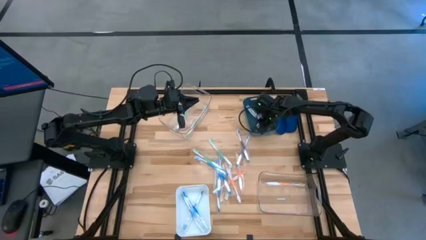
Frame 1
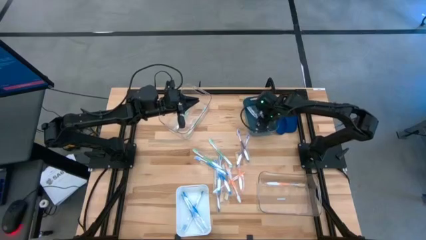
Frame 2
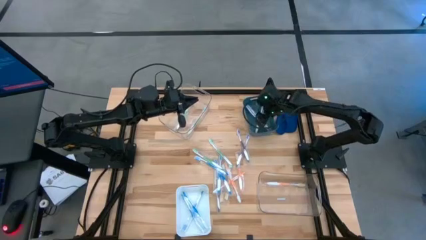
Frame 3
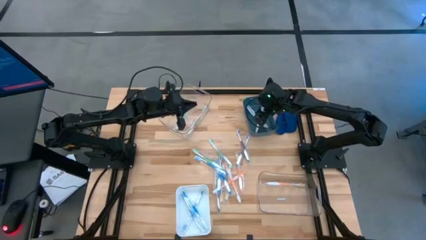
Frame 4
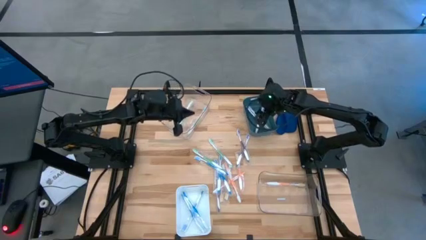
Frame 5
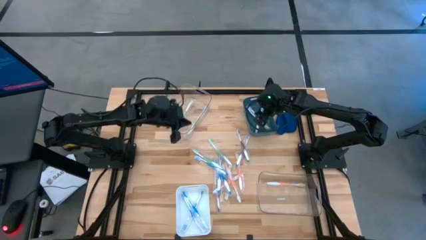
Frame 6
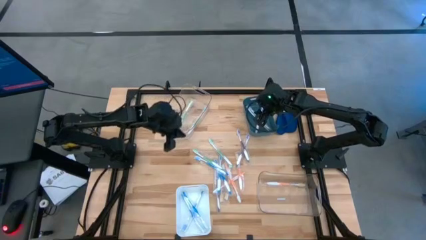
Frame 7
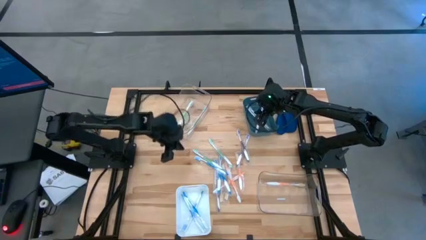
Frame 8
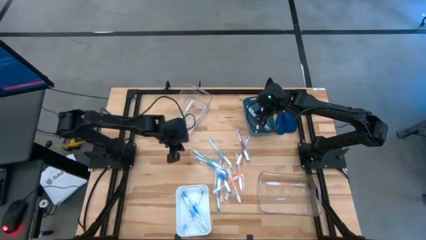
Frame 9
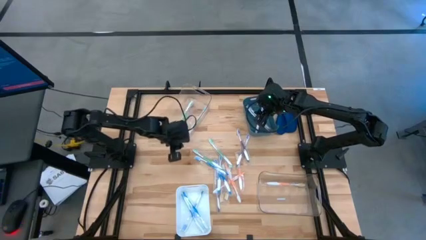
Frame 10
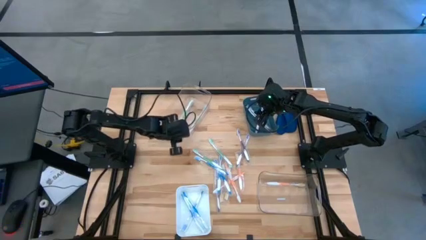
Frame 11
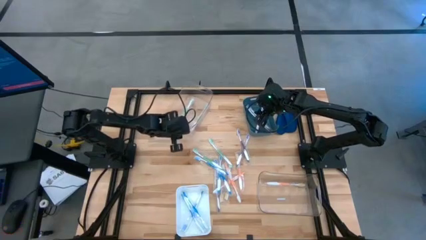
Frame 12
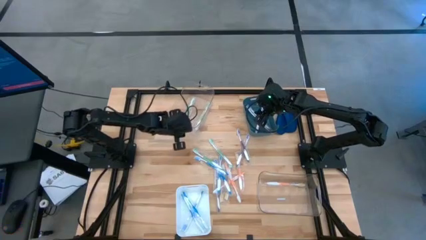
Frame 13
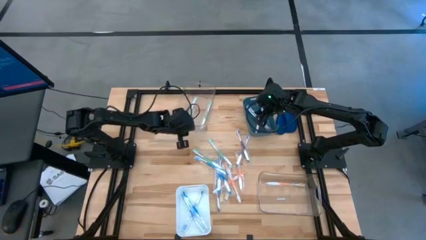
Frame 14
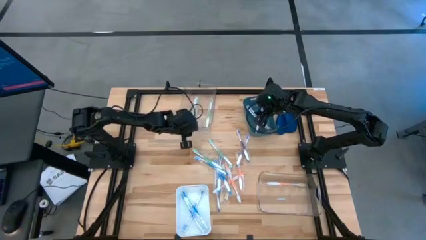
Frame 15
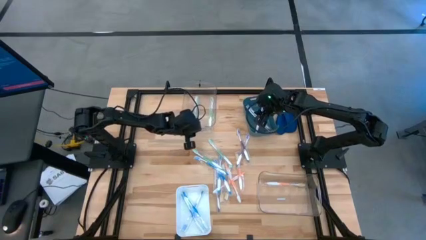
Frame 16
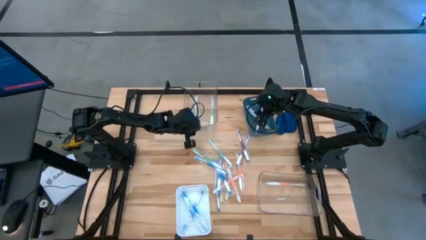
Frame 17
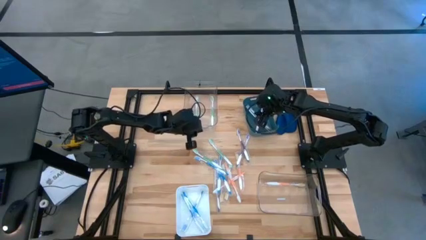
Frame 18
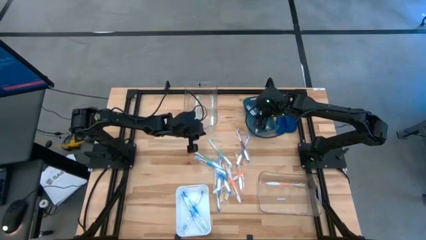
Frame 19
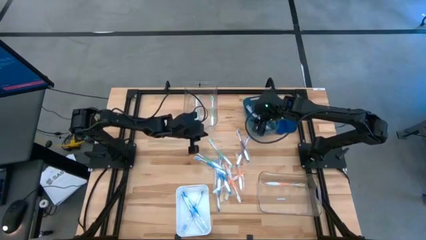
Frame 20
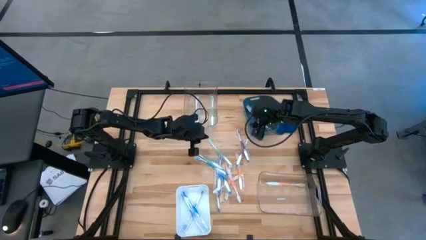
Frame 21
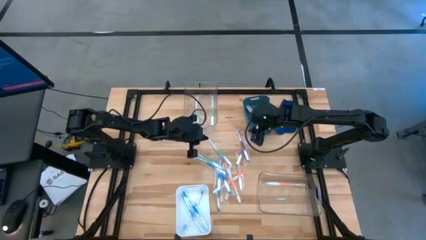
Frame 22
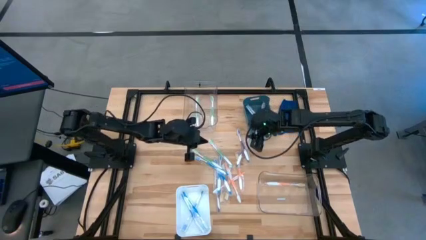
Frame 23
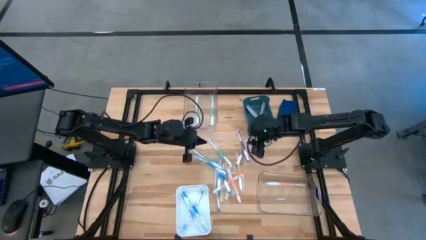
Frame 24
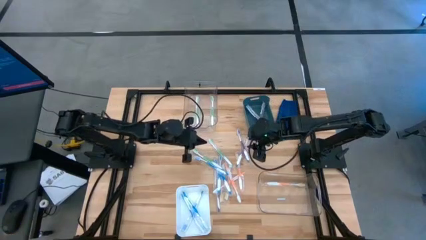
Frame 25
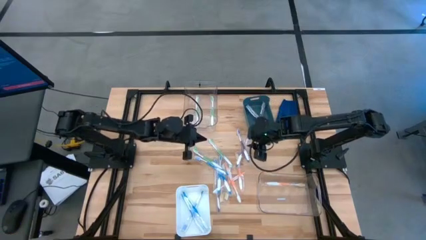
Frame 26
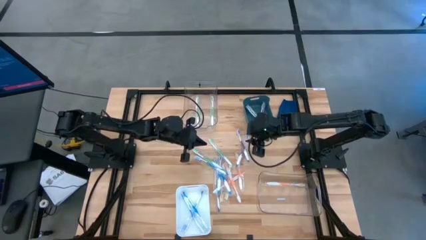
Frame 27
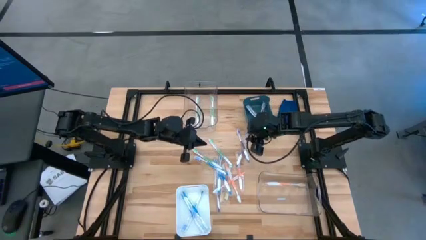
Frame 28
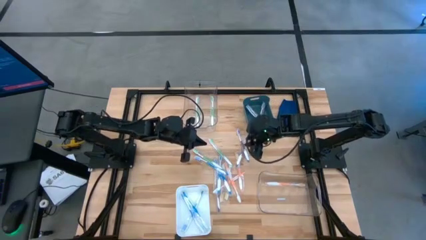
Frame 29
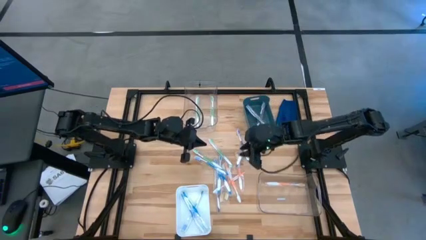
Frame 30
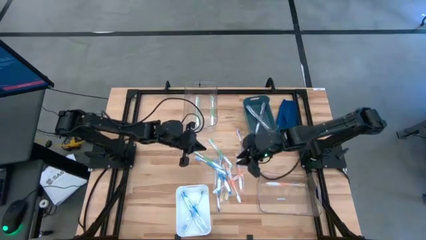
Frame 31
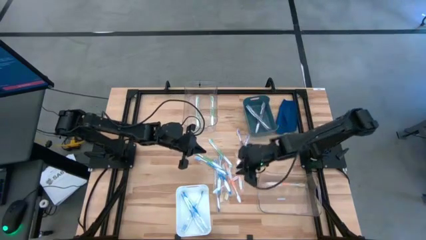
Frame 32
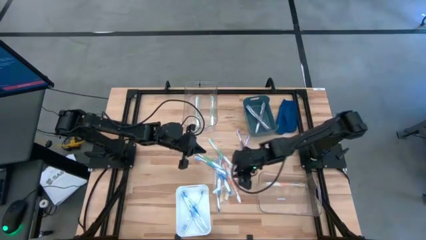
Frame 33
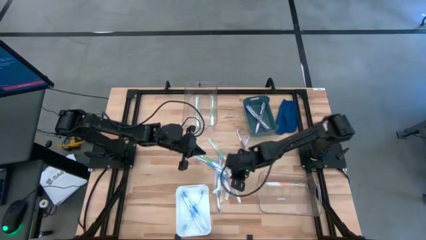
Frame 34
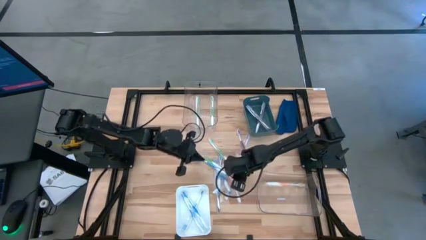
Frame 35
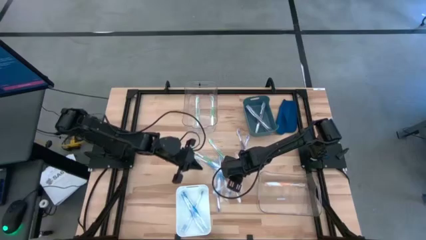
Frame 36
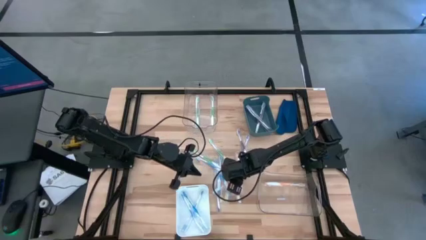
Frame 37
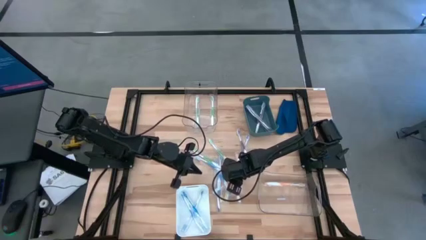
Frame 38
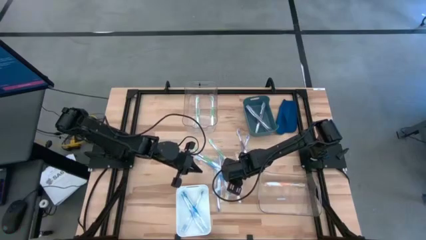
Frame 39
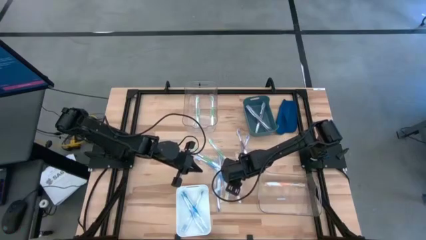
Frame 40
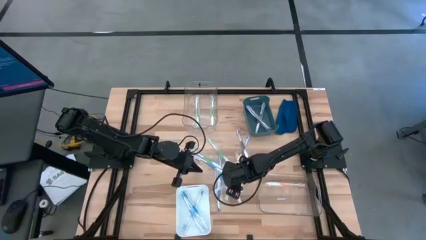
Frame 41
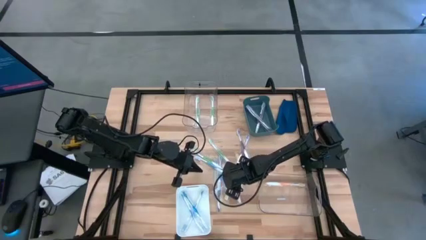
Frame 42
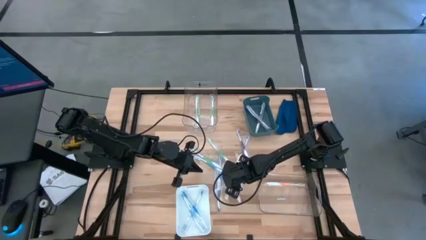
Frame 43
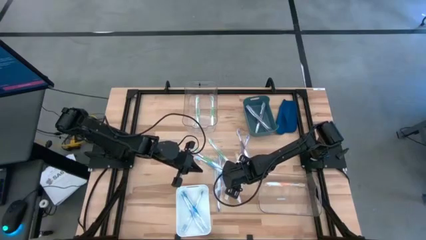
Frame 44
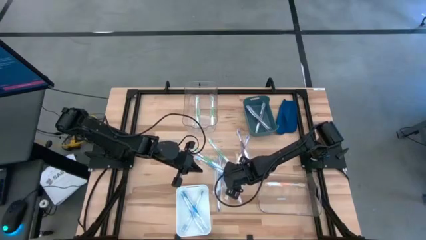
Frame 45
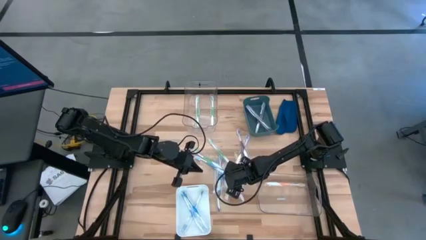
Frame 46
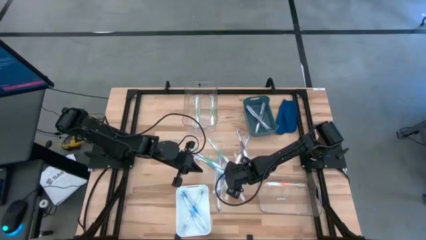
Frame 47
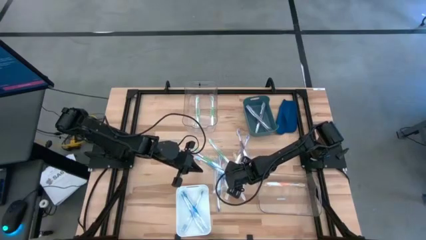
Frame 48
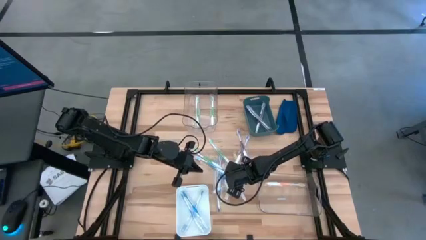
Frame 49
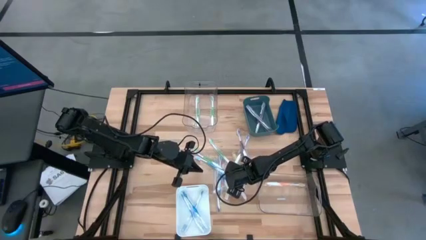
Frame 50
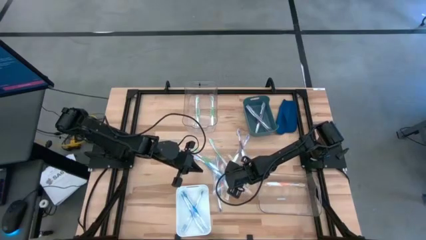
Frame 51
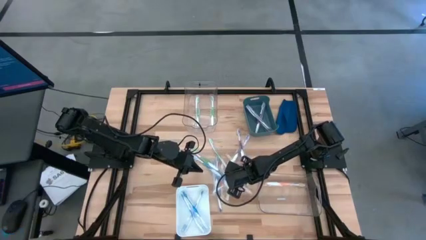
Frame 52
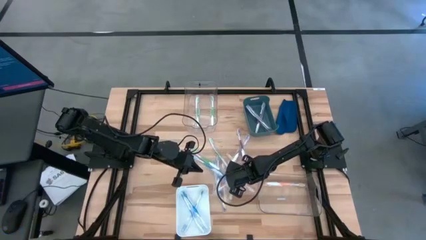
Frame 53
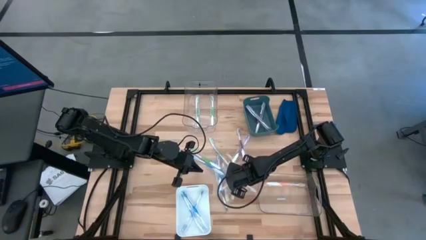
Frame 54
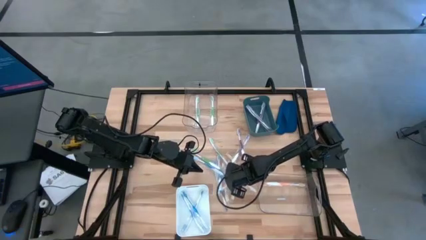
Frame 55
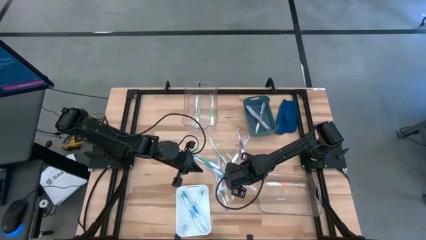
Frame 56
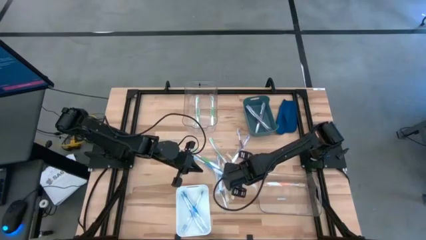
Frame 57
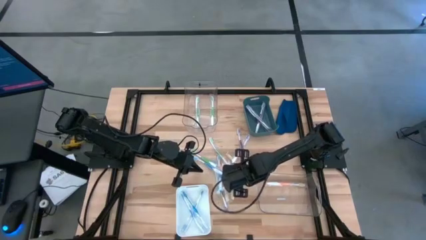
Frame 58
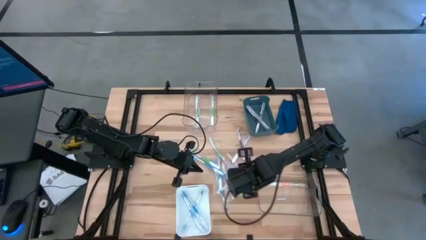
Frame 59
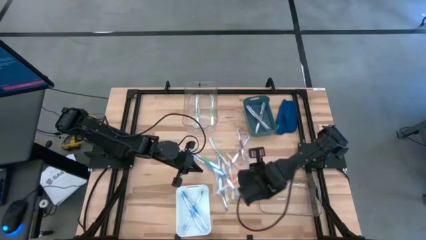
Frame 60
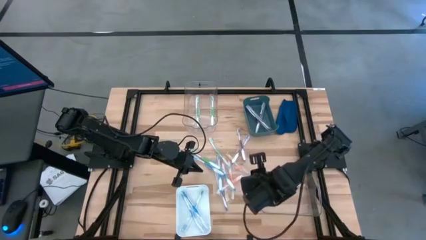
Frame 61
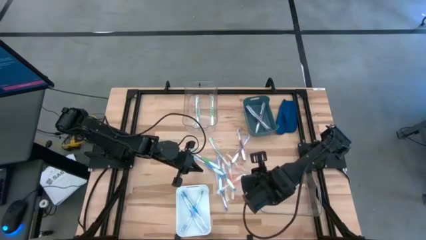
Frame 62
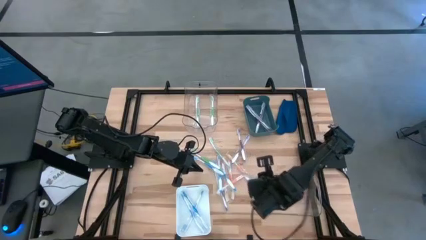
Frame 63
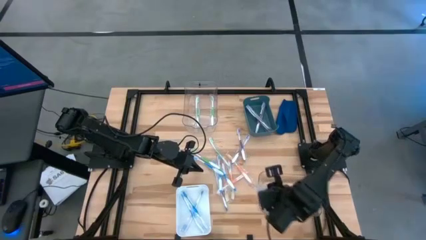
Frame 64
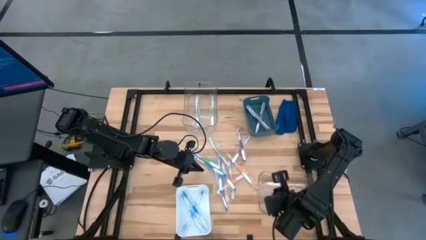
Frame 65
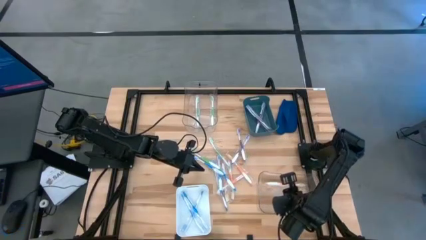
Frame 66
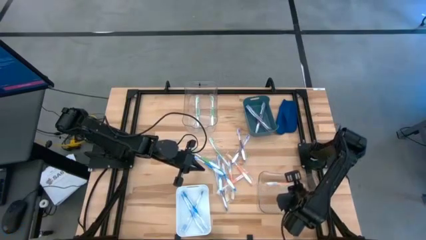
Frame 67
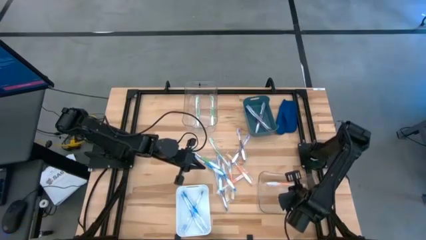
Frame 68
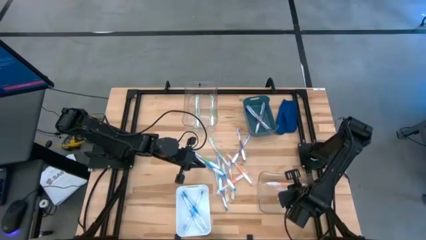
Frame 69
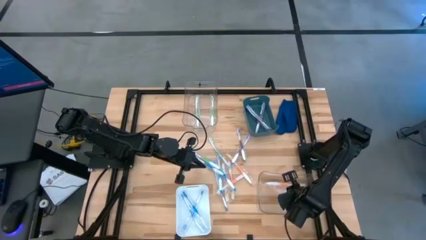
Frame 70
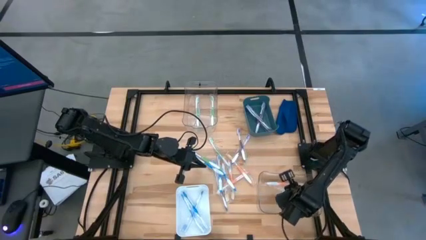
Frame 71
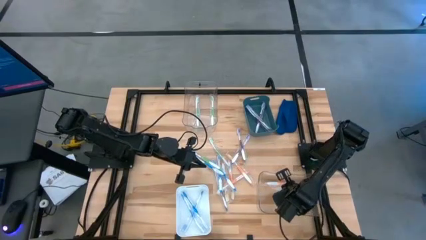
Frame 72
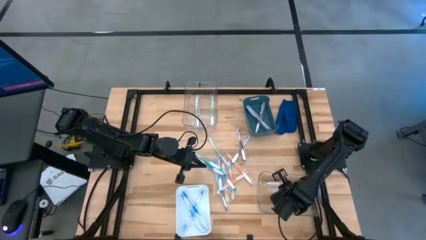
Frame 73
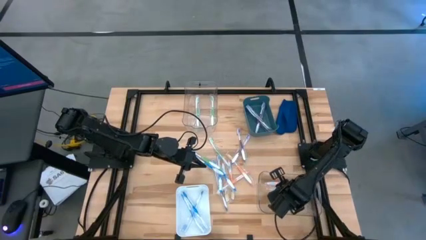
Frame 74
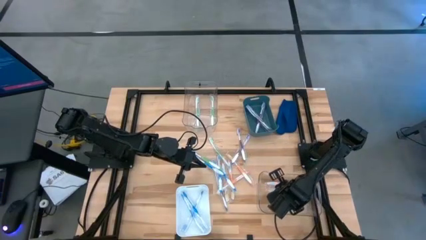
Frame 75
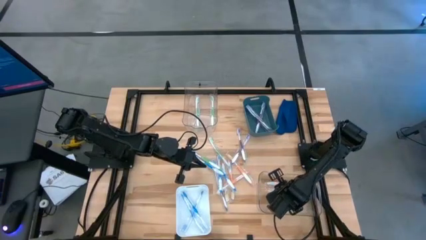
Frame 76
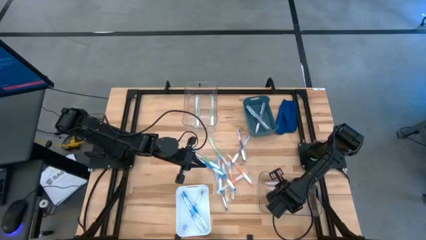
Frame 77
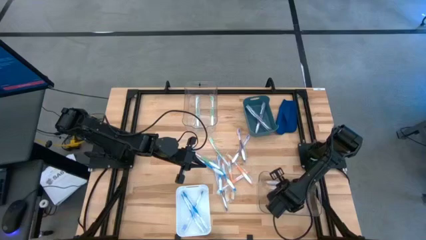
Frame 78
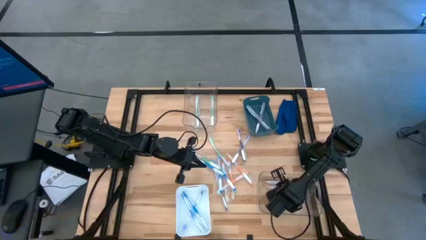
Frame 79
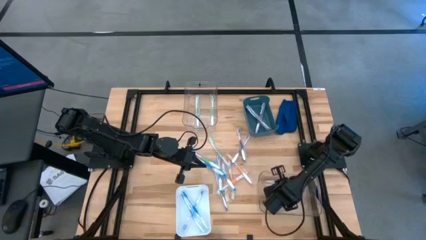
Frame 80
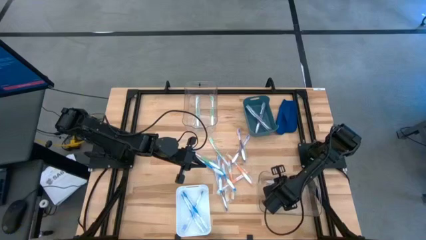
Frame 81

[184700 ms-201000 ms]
Task: Pick & Place Toothbrushes
Put the orange toothbrush into the bottom transparent bin
